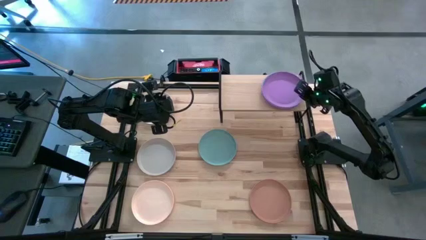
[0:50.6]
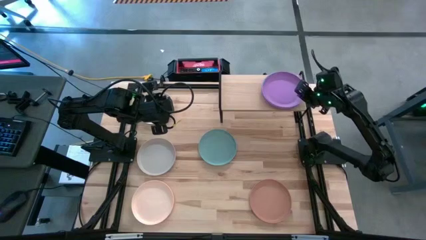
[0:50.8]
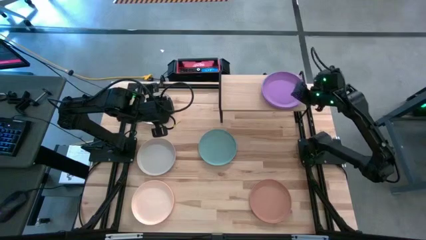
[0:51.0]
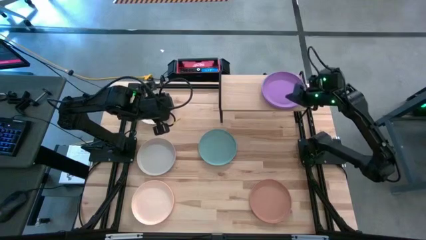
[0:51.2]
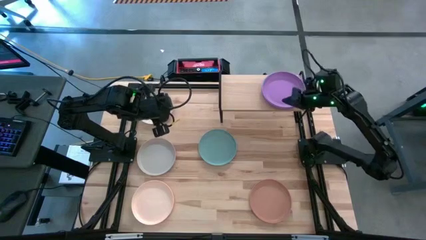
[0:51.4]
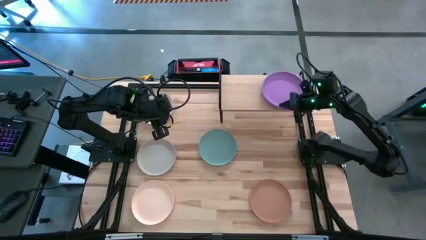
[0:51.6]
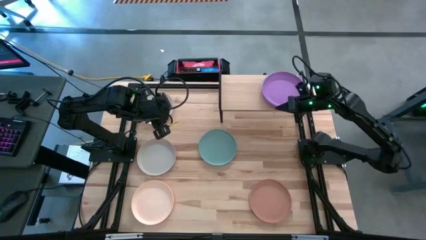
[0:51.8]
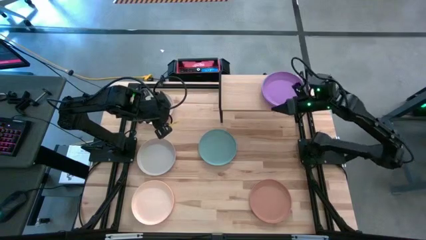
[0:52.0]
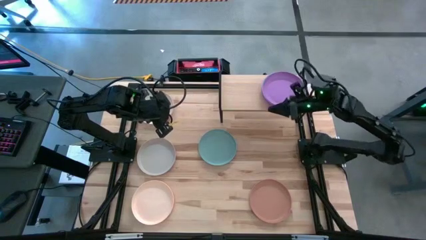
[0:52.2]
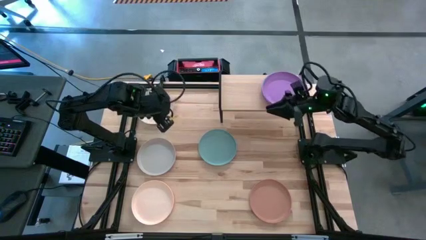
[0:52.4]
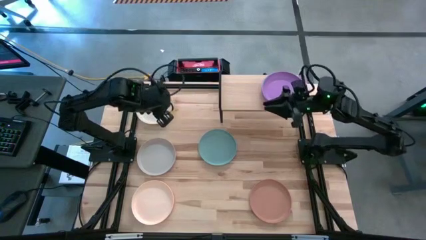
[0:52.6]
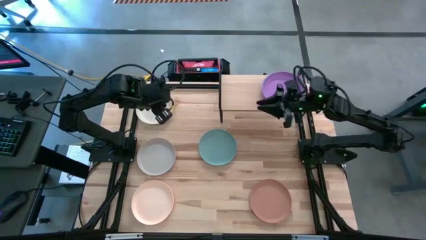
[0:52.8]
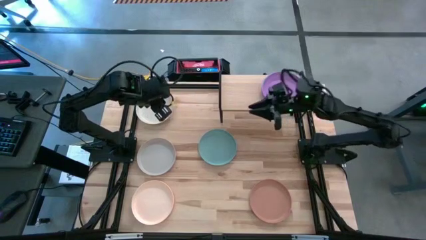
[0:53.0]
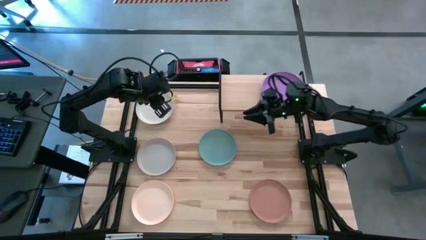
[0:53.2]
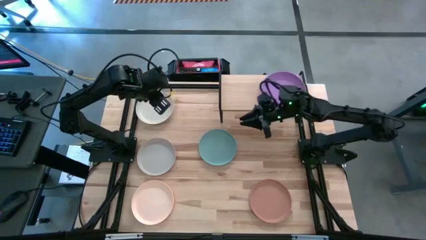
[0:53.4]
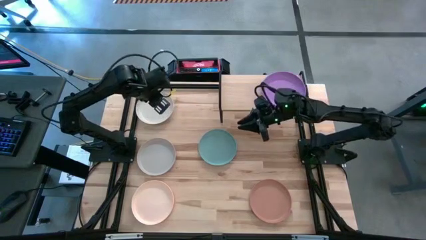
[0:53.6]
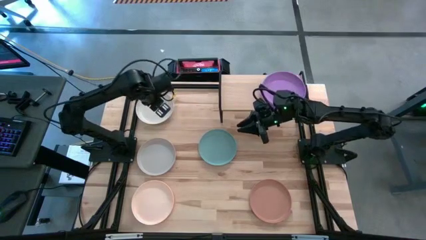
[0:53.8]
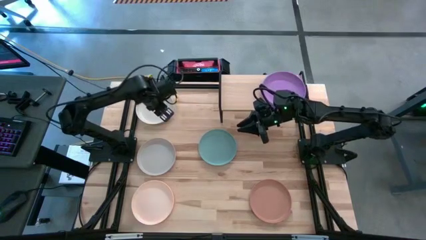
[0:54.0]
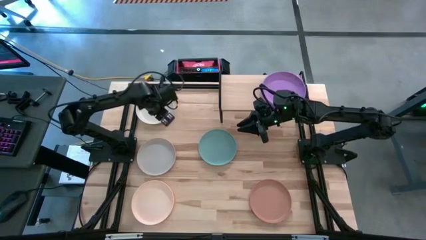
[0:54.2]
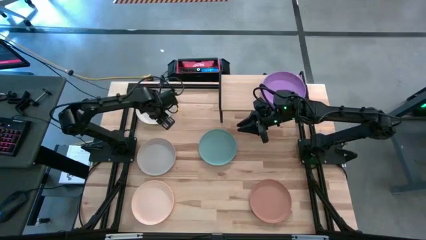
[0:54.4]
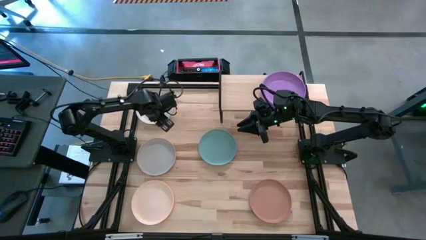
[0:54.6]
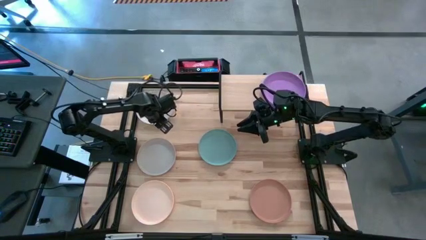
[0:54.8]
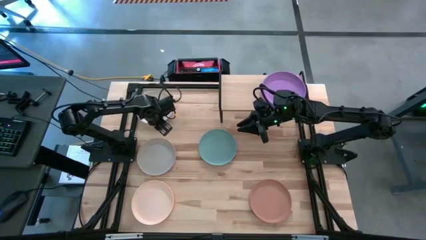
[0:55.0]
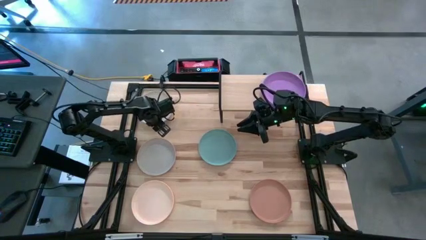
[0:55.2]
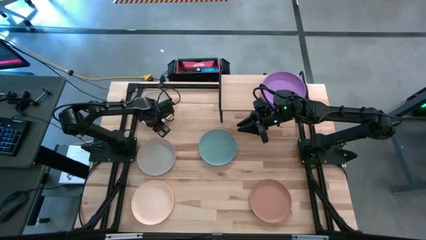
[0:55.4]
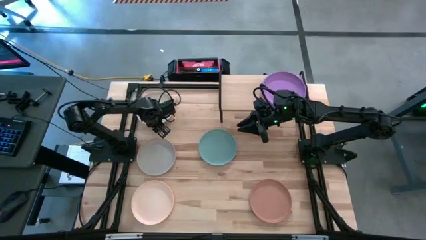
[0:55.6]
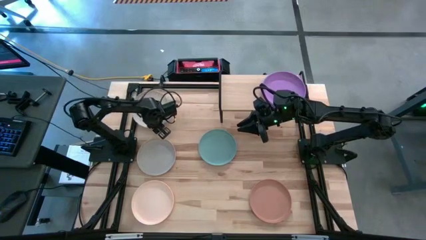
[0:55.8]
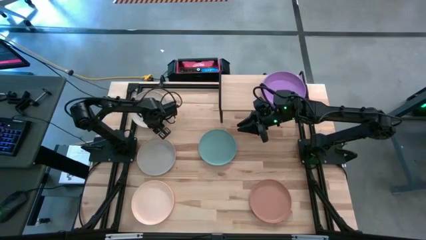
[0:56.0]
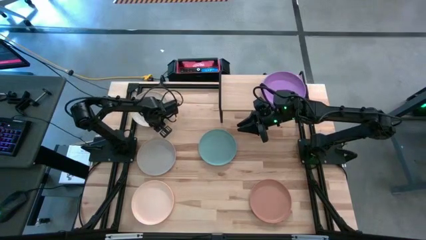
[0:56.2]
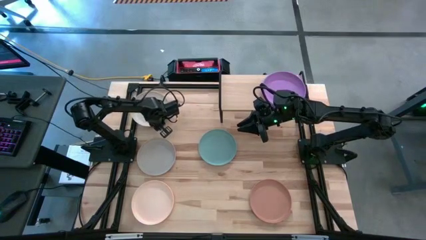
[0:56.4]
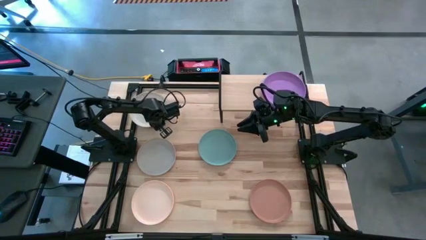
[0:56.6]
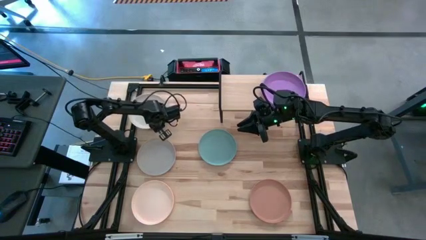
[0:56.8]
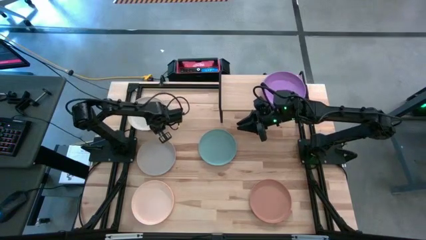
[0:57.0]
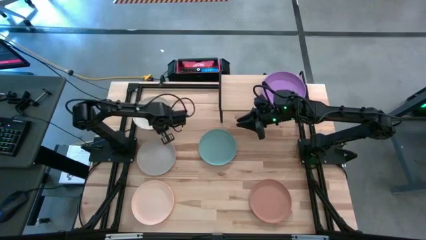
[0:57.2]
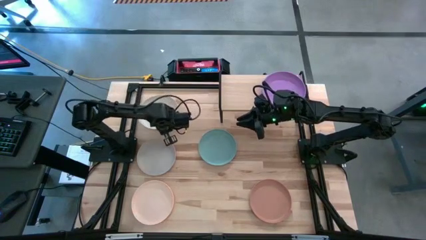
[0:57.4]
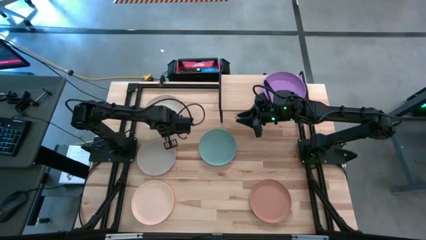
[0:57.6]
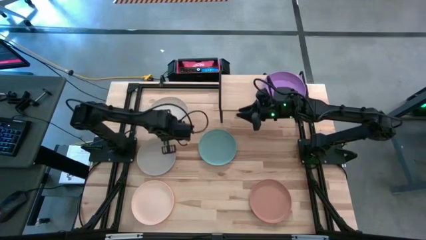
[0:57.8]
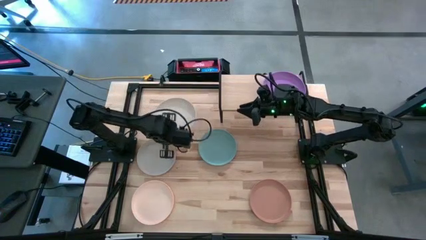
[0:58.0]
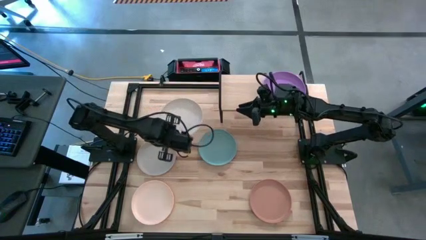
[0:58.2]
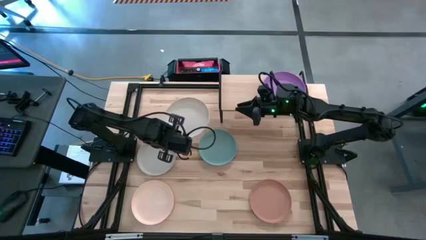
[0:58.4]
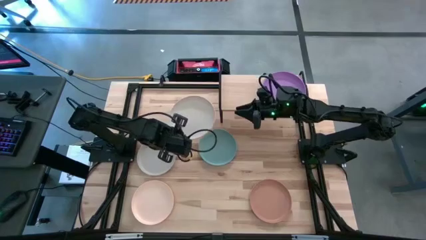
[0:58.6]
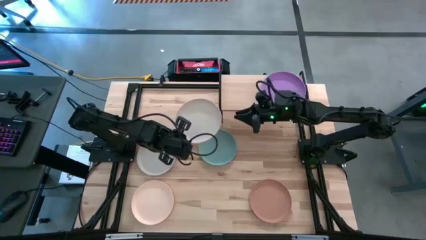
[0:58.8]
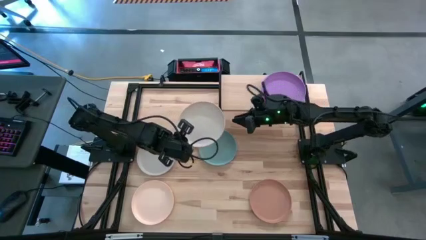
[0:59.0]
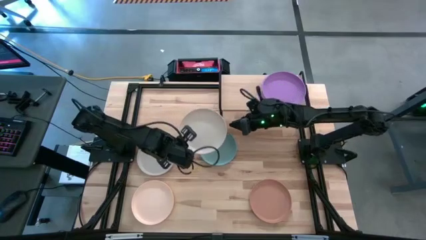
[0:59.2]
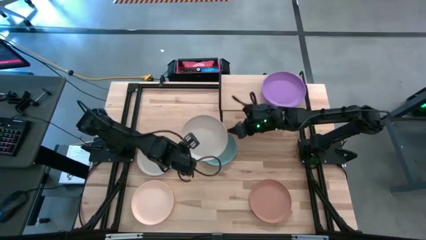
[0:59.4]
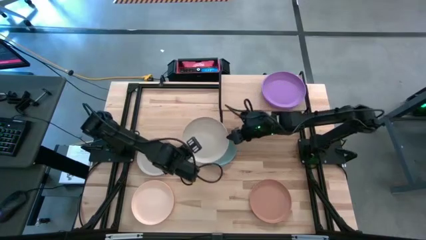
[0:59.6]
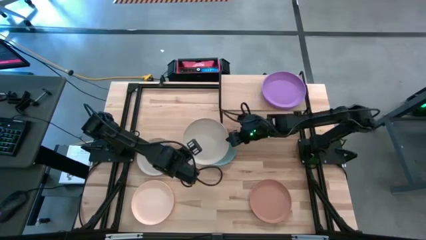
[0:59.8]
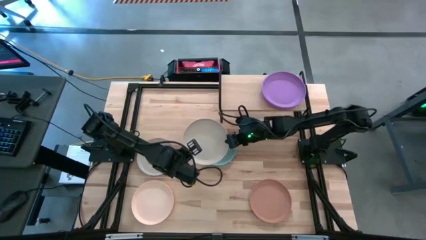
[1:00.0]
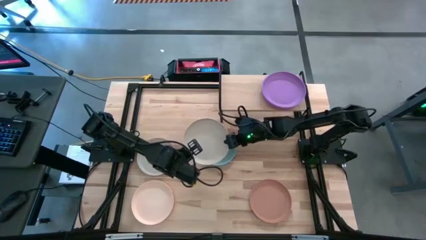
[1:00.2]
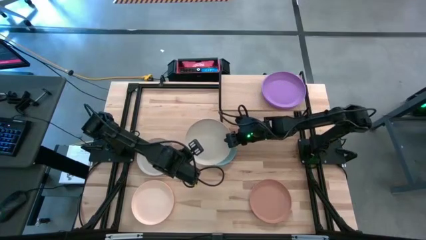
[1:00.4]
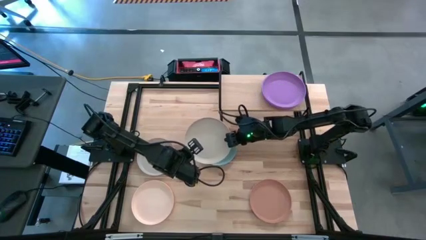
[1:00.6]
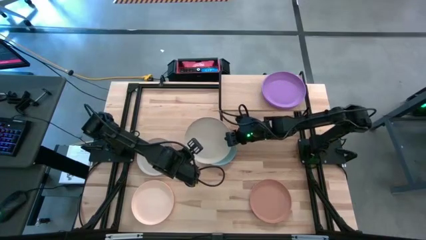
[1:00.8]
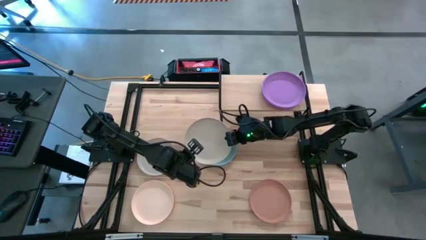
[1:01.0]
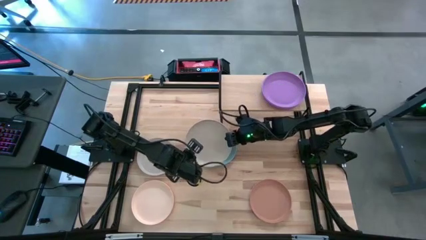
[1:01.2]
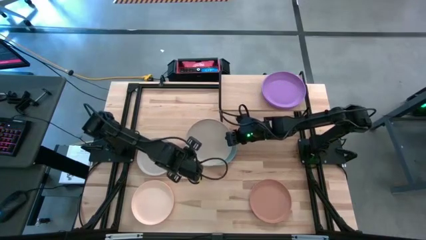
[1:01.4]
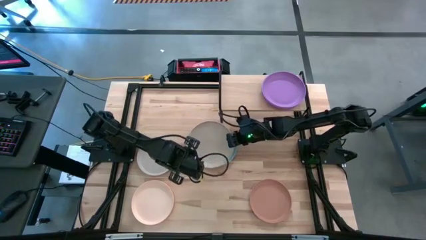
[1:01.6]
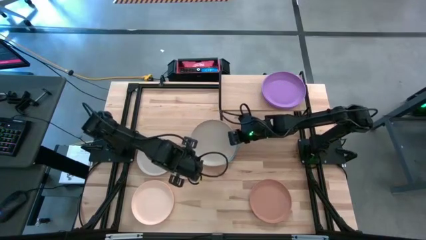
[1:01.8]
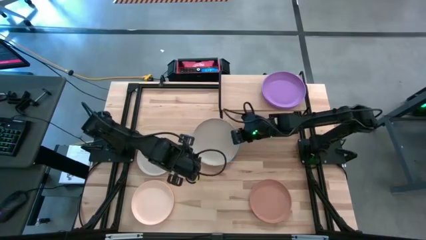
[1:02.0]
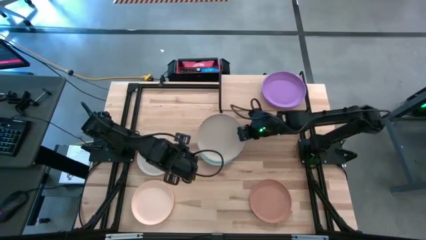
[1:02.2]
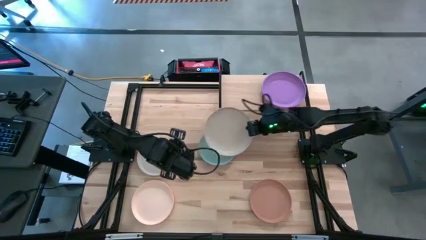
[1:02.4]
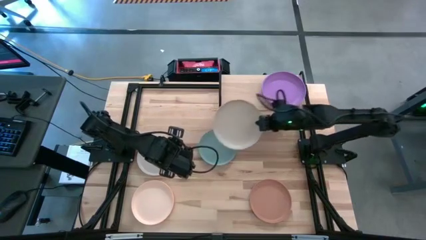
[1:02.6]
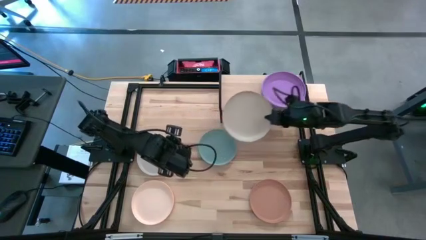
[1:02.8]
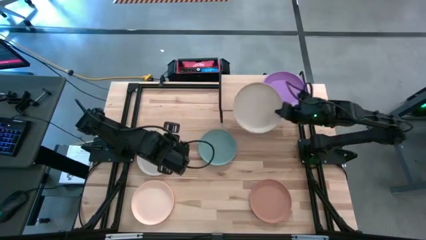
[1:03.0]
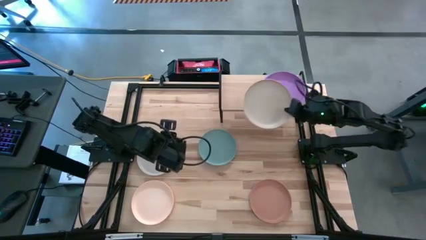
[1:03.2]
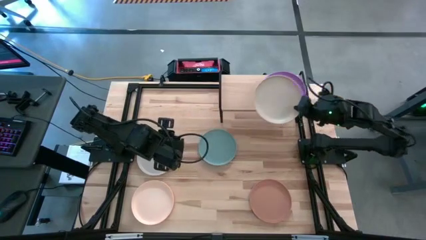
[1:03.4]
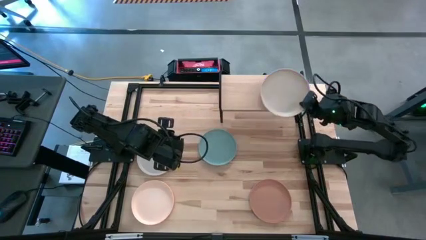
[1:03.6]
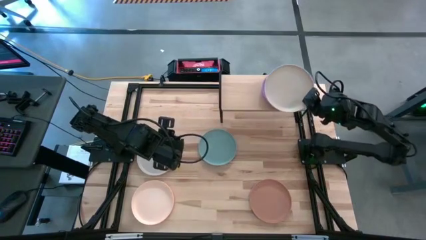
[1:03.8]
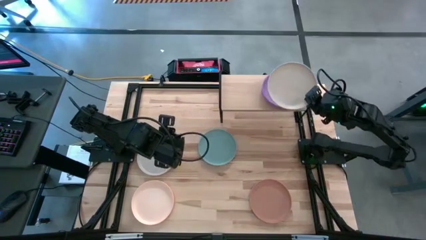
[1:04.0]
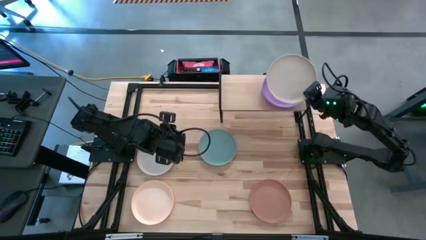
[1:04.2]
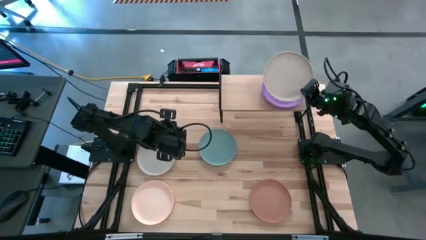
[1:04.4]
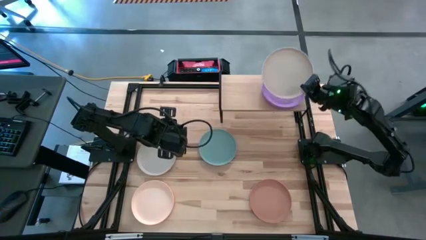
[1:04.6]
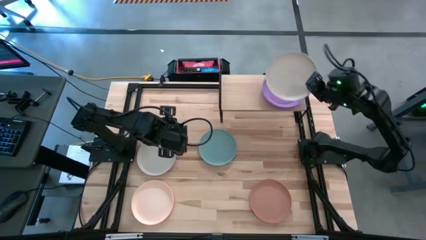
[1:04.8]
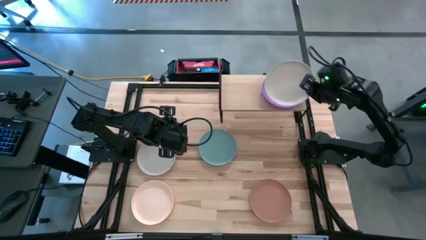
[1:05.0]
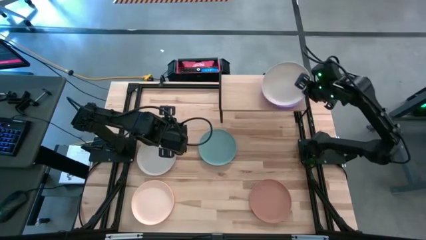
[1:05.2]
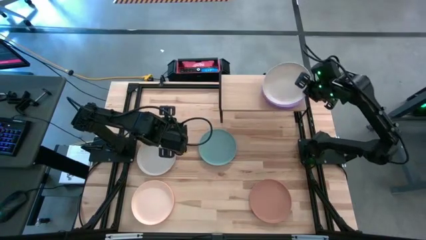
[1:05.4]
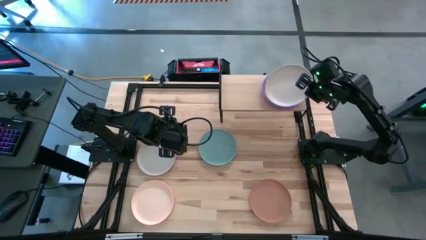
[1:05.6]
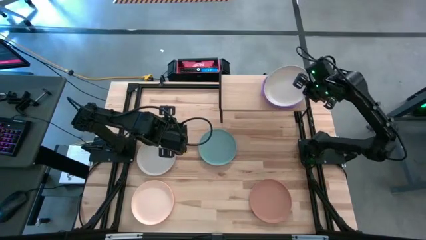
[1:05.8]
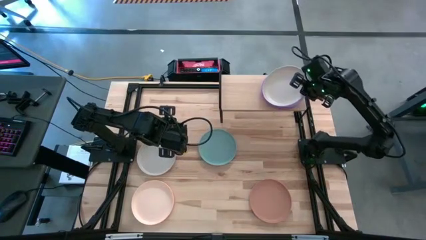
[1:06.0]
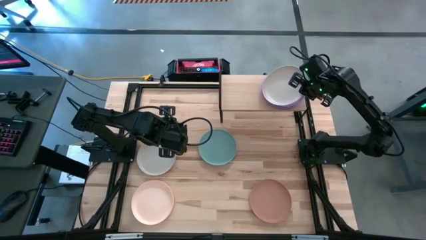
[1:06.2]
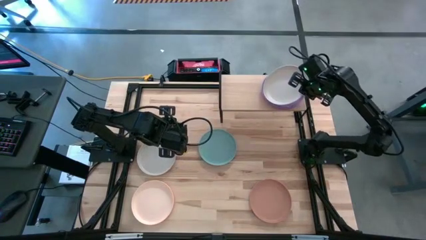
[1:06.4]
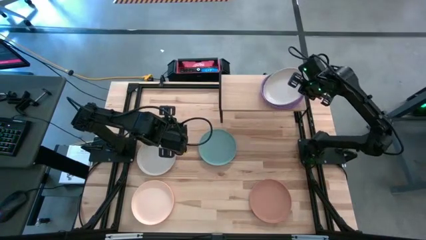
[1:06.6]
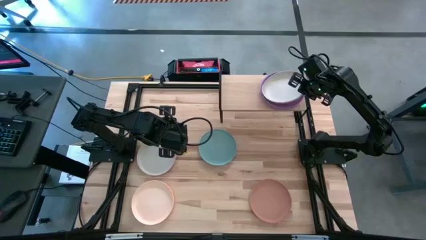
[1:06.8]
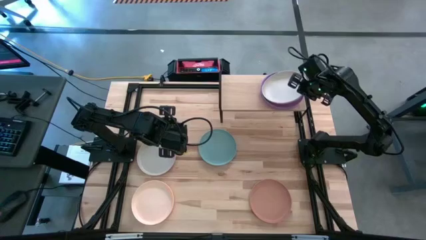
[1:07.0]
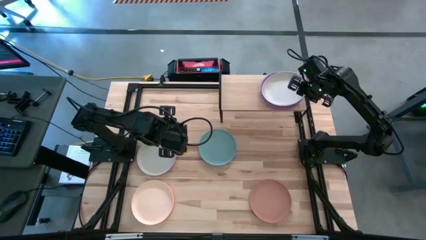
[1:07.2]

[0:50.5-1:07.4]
Task: Place and stack plates onto a shelf
Stack the white plate on top of the purple plate on the shelf
